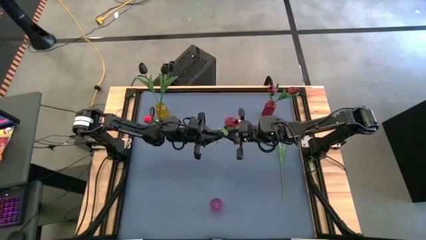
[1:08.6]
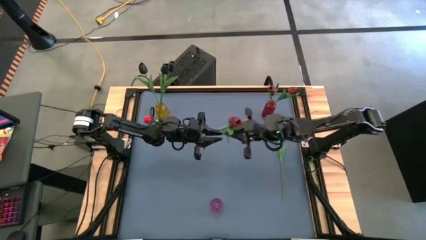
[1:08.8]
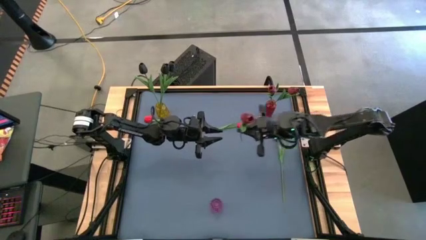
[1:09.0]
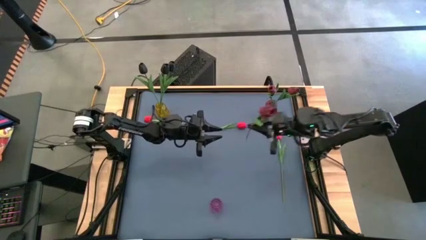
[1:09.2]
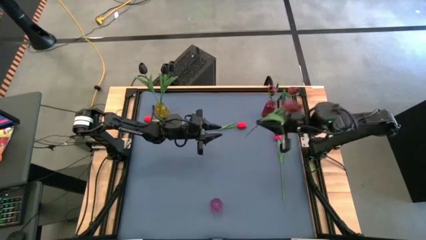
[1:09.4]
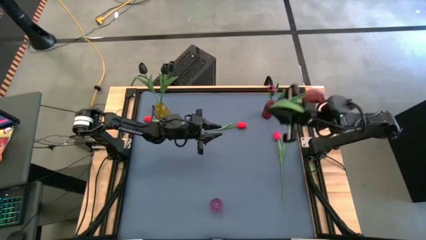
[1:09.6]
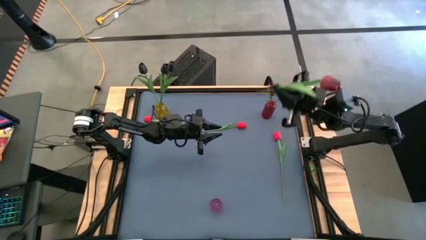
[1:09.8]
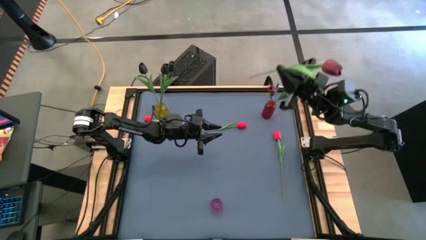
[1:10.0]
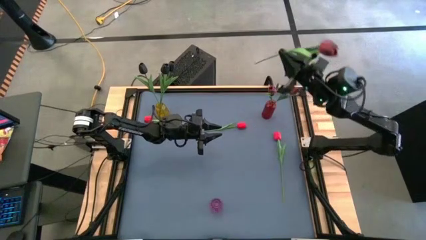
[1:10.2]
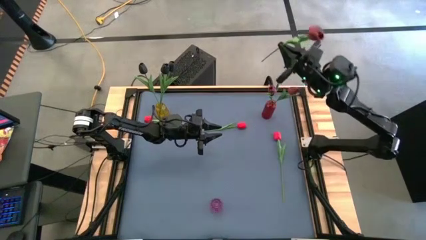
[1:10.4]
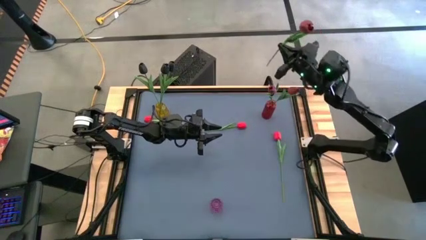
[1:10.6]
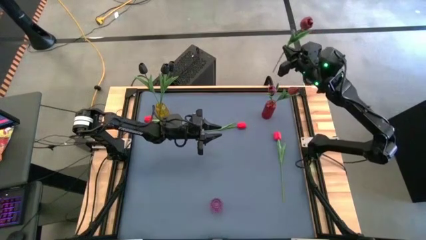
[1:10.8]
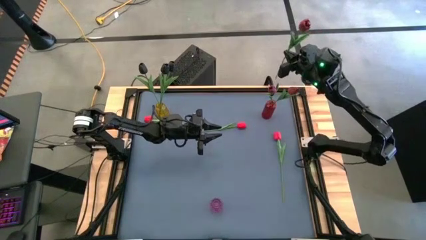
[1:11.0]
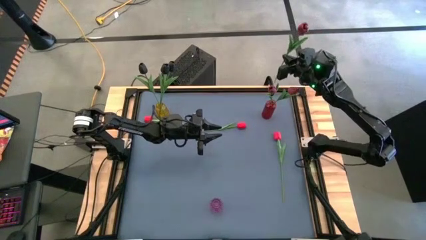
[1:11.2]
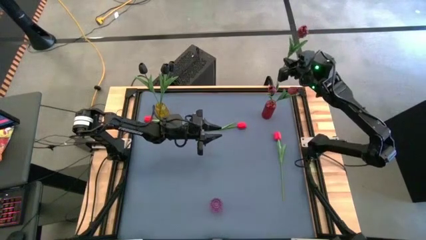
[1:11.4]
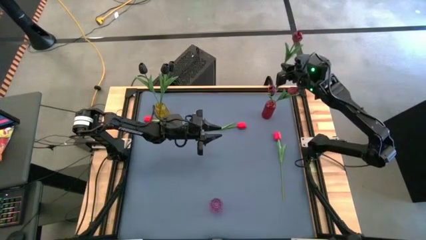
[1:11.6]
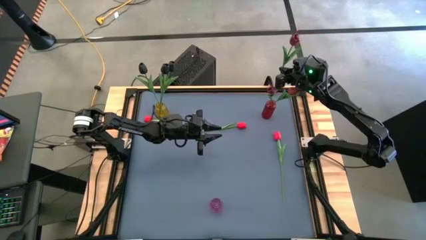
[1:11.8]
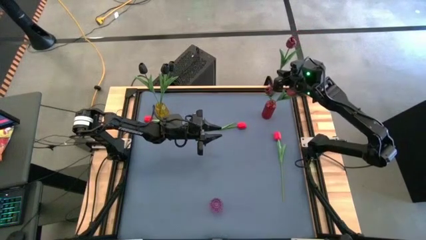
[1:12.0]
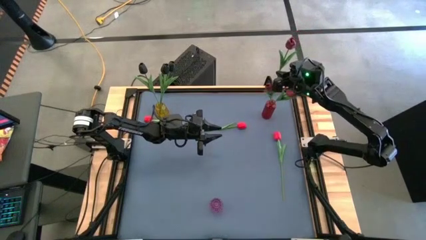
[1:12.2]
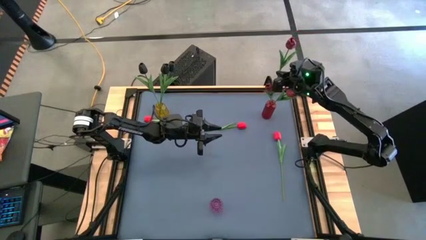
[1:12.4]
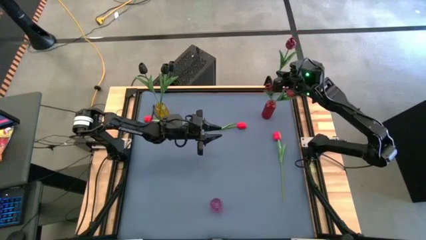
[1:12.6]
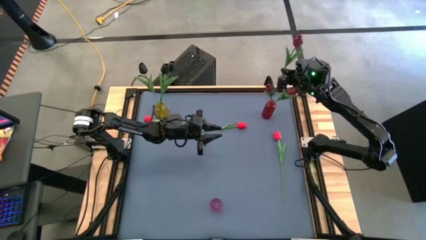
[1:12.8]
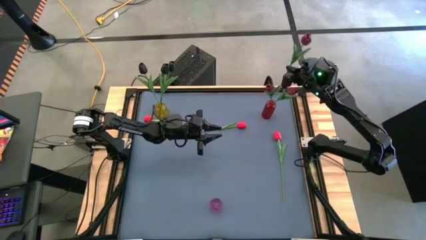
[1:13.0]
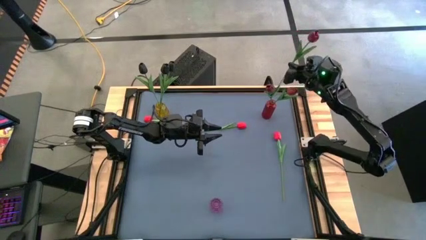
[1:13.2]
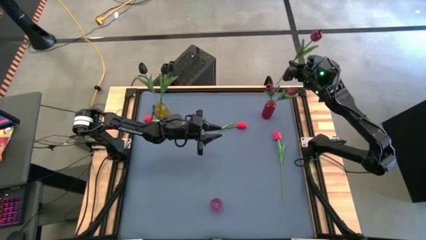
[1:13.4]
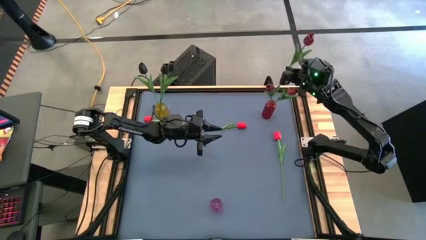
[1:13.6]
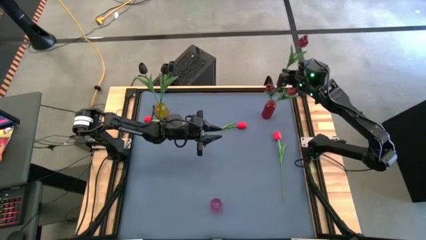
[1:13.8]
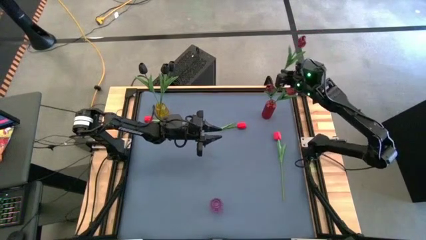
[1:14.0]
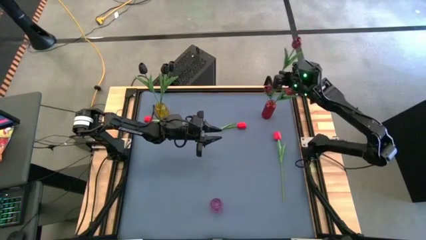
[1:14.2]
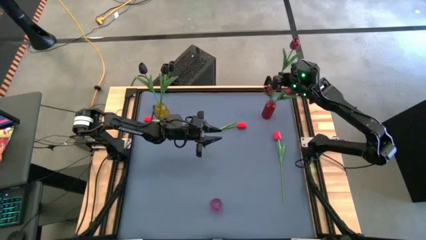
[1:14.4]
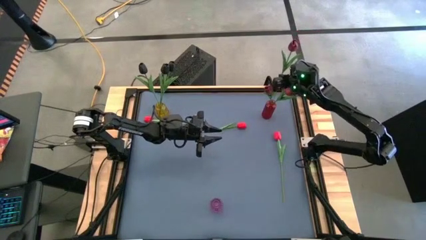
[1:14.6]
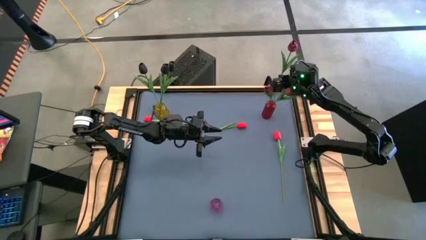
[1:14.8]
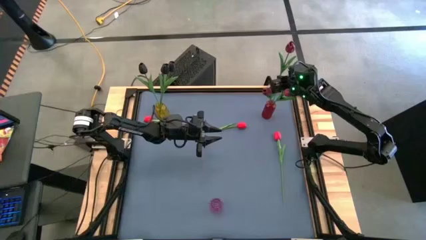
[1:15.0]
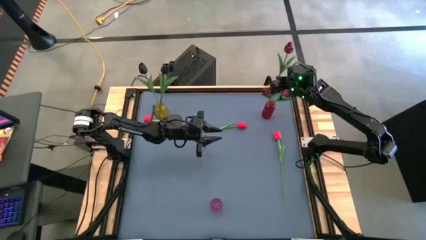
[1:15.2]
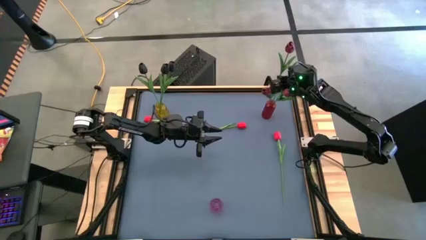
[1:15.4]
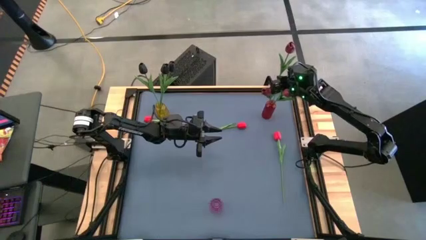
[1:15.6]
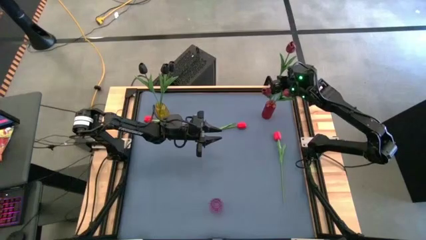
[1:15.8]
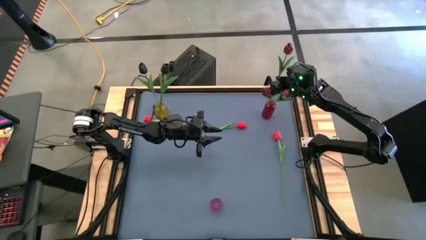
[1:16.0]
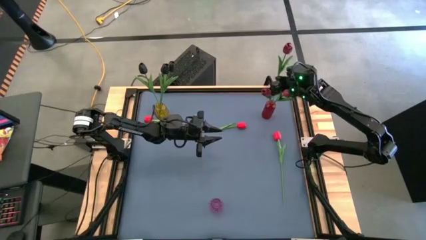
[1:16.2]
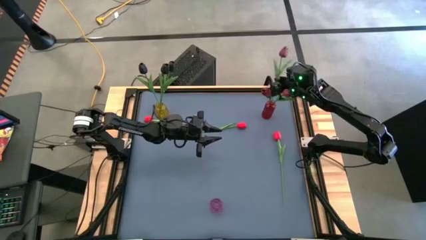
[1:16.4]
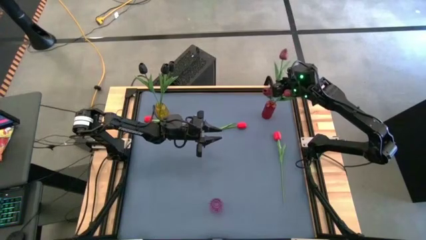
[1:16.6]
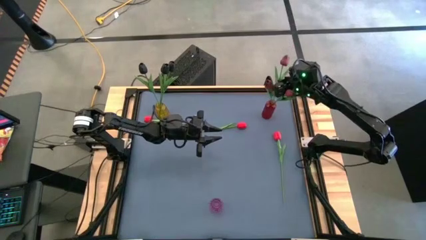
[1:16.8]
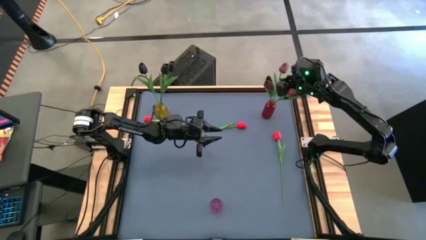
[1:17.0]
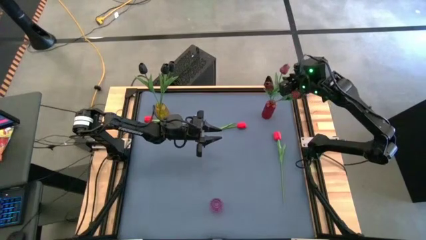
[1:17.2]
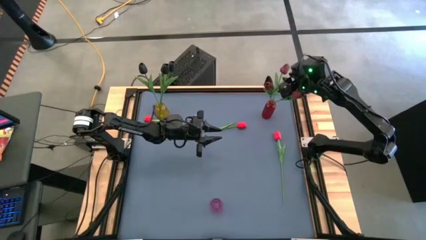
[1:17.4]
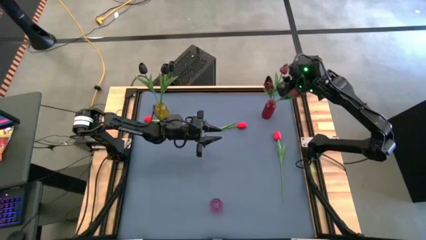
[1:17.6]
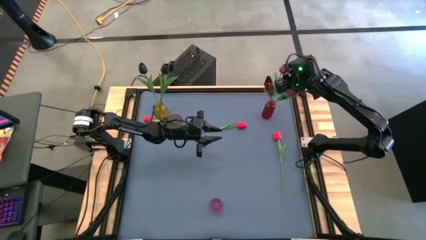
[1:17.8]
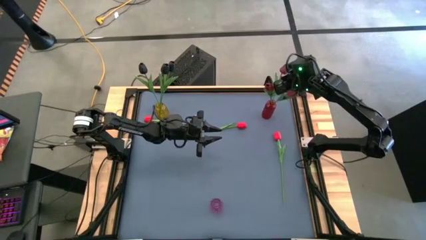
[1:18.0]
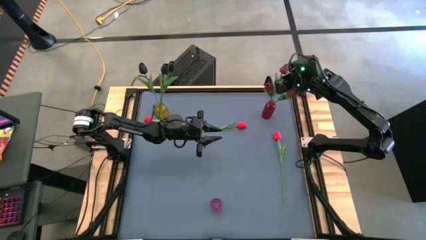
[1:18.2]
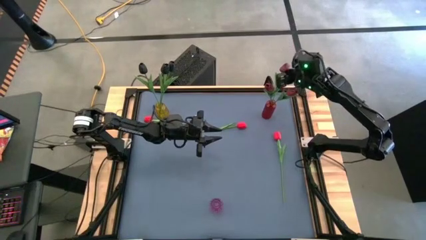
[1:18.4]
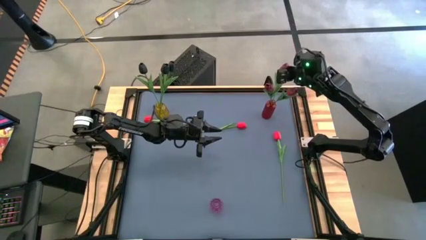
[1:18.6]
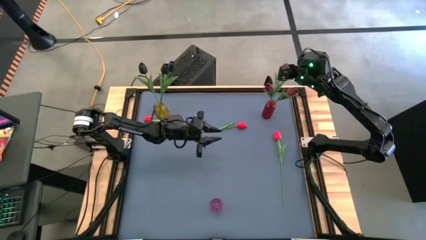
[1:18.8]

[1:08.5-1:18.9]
Task: Sort flowers into vase by color
Put the purple flower into the red vase

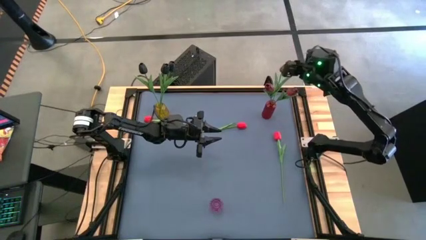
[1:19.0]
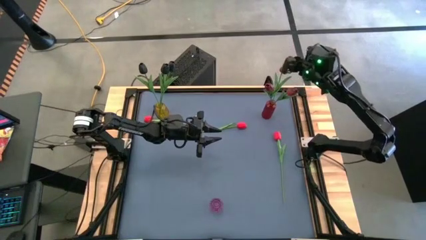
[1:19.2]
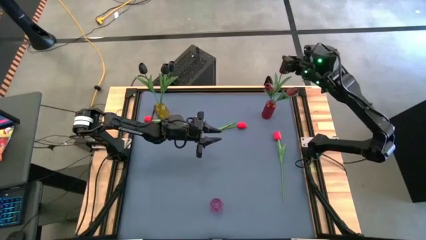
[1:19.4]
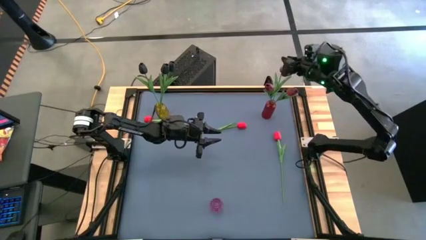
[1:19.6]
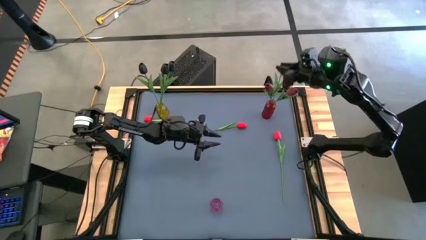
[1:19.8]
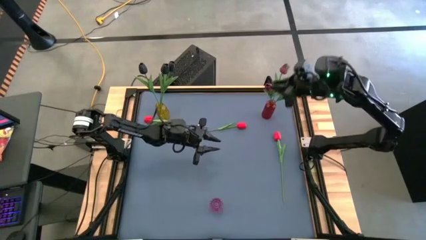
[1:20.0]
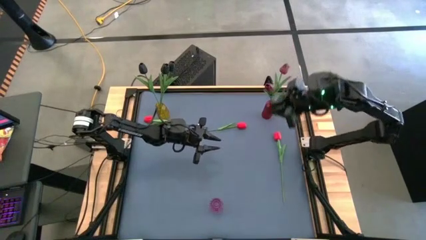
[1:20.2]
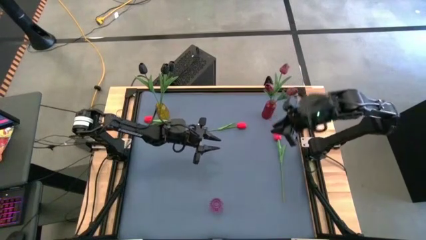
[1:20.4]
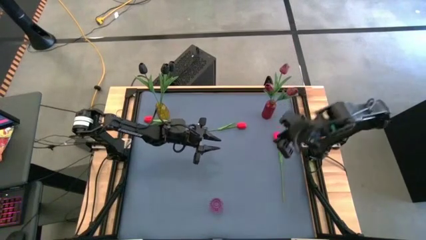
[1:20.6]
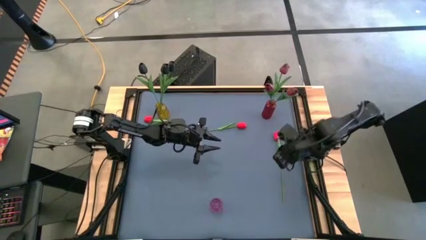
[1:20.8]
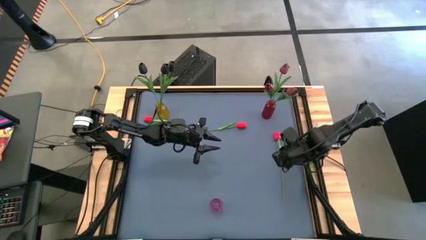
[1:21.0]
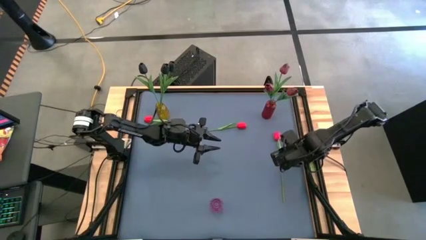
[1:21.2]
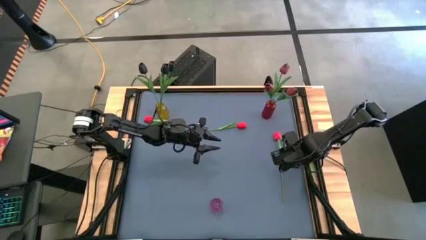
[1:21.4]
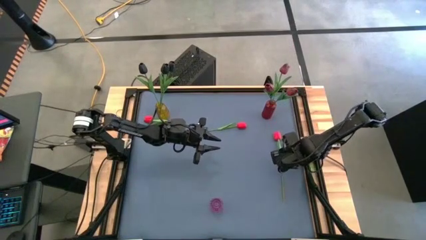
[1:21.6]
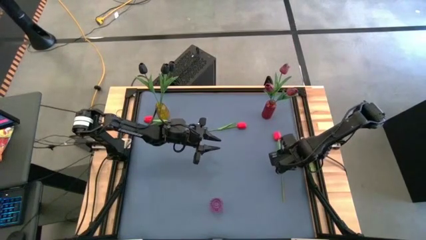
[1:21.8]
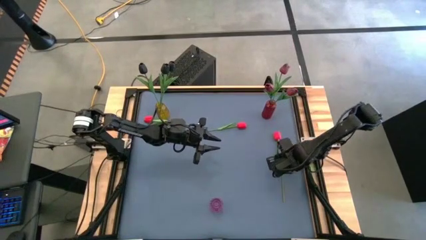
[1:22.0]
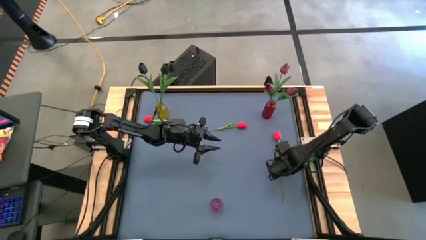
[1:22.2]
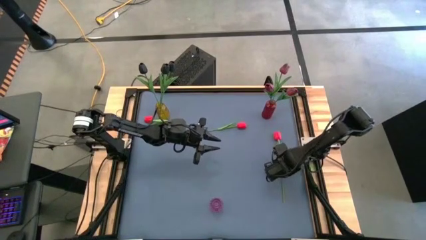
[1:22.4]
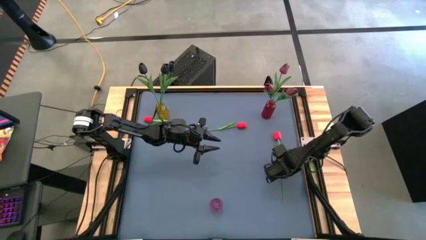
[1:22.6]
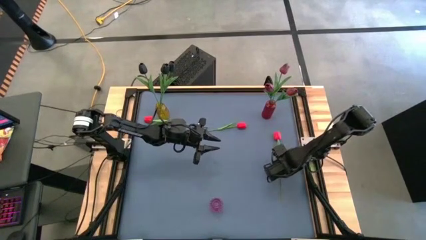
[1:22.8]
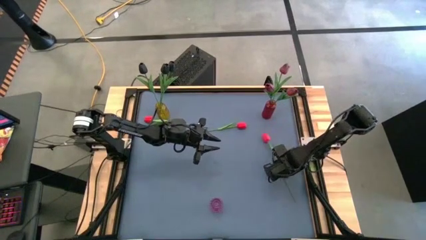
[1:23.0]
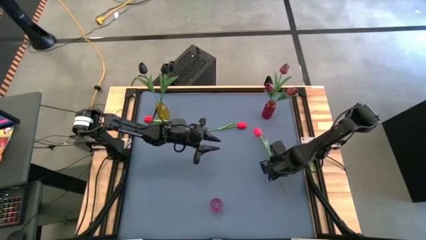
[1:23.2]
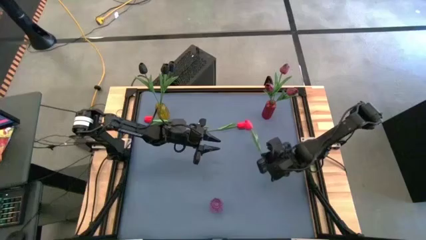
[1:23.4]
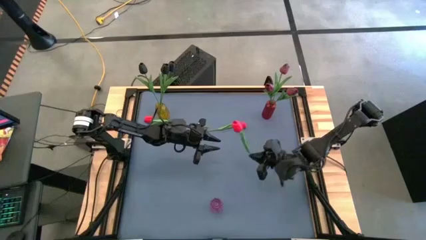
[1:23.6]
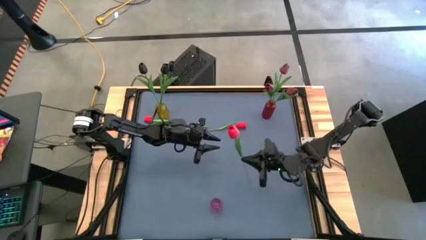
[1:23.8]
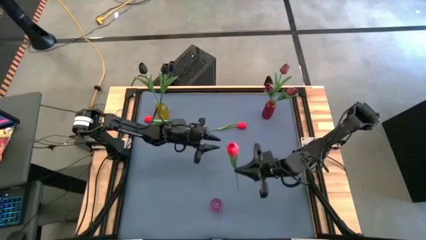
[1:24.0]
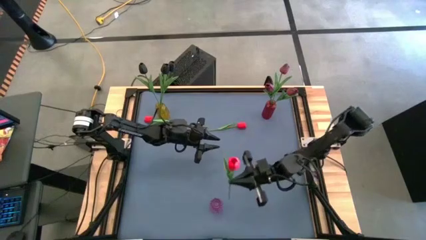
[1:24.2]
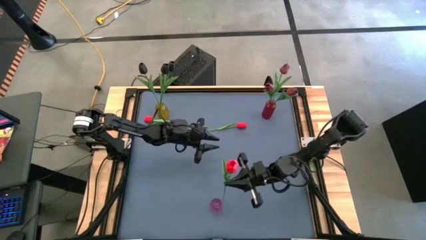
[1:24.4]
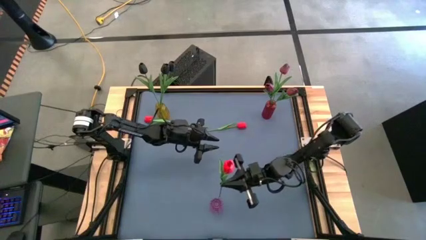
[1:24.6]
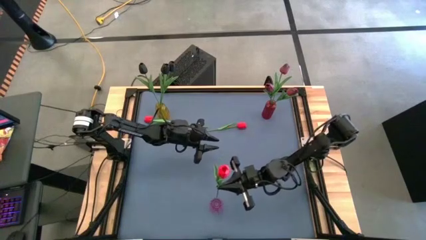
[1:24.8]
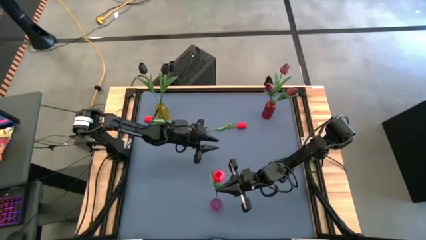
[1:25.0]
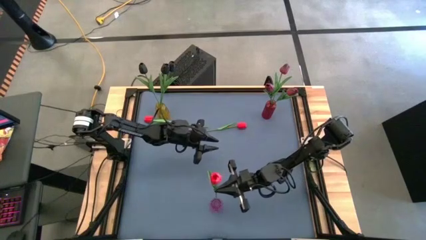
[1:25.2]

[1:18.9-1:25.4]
Put the bottom red flower into the violet vase
